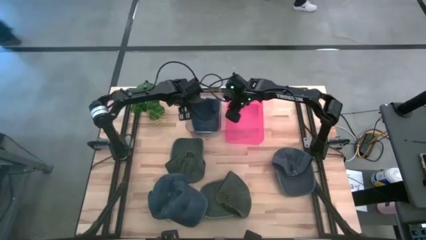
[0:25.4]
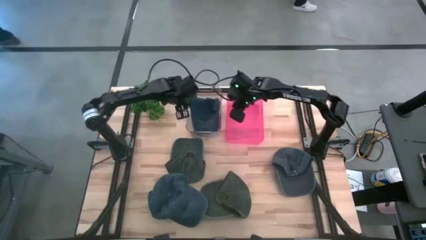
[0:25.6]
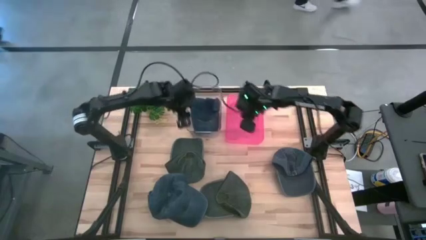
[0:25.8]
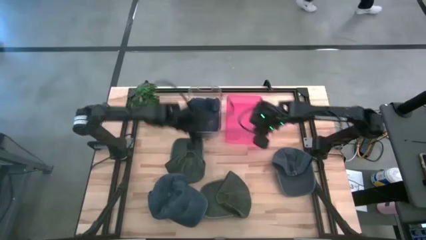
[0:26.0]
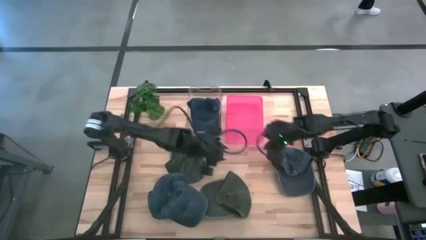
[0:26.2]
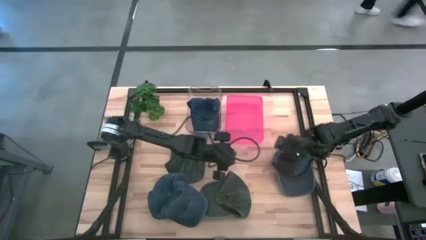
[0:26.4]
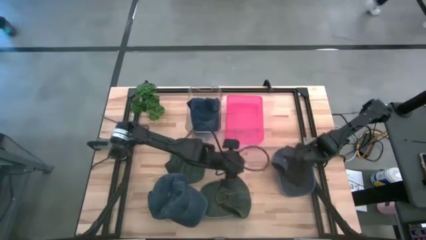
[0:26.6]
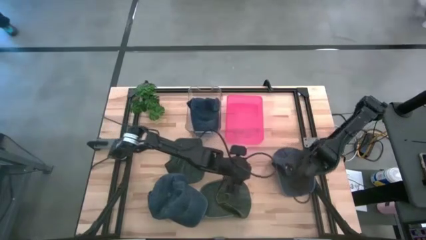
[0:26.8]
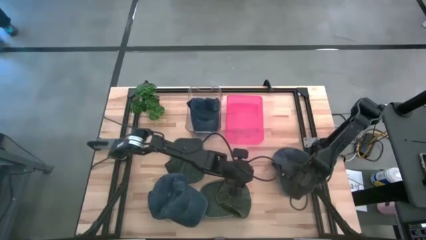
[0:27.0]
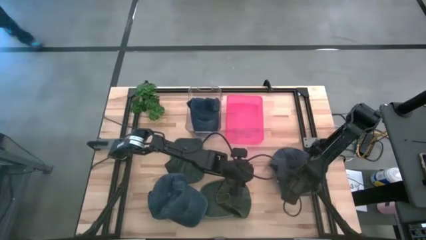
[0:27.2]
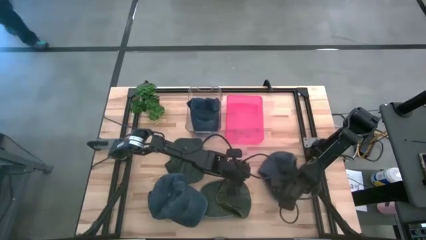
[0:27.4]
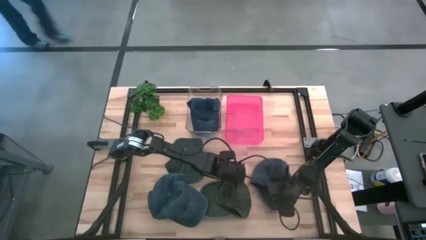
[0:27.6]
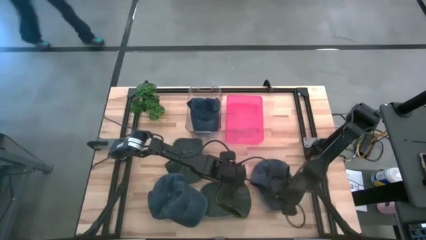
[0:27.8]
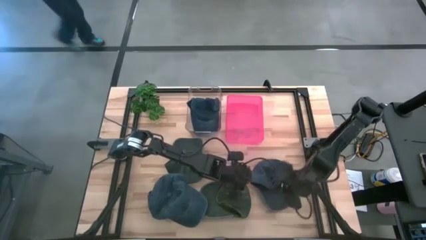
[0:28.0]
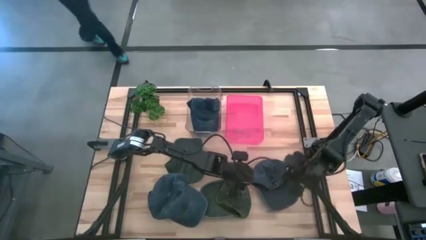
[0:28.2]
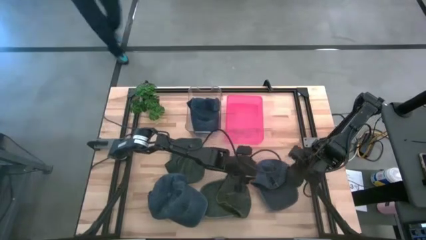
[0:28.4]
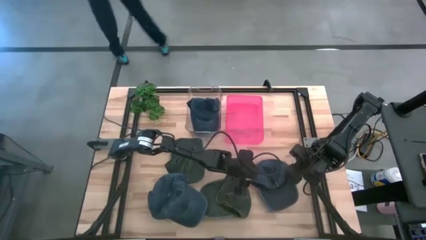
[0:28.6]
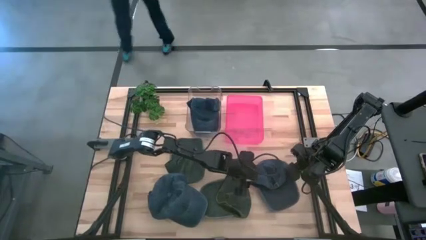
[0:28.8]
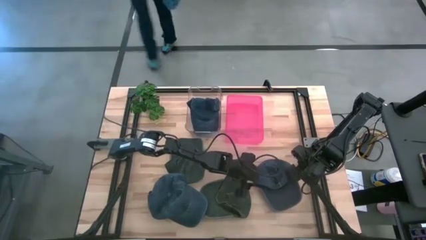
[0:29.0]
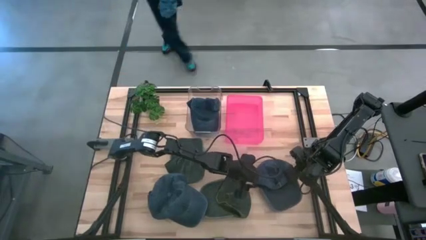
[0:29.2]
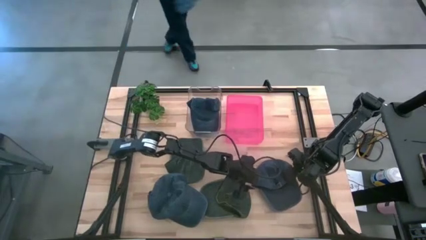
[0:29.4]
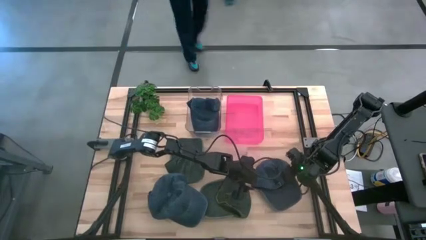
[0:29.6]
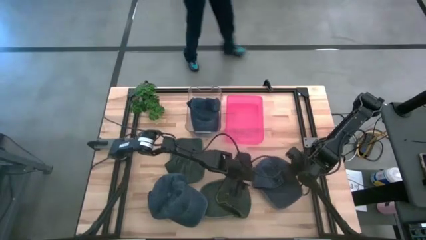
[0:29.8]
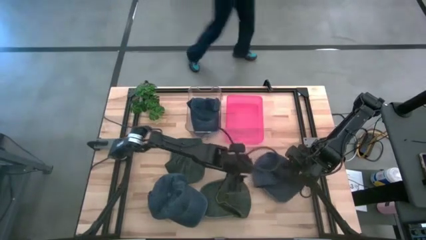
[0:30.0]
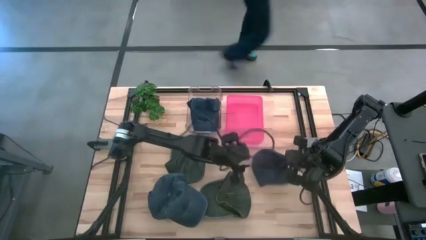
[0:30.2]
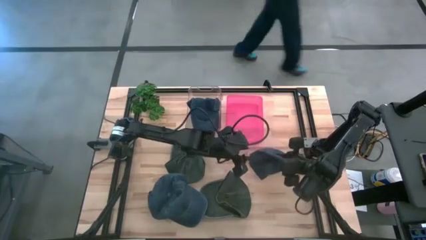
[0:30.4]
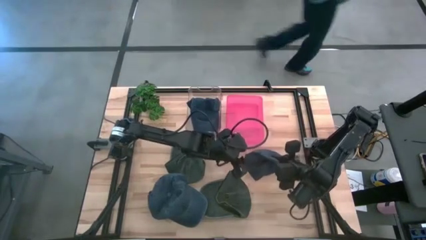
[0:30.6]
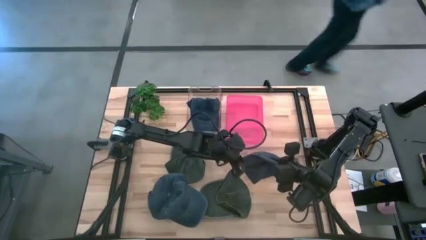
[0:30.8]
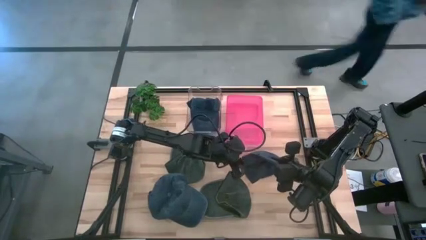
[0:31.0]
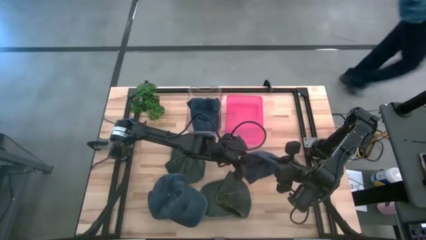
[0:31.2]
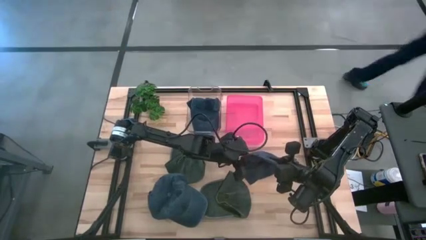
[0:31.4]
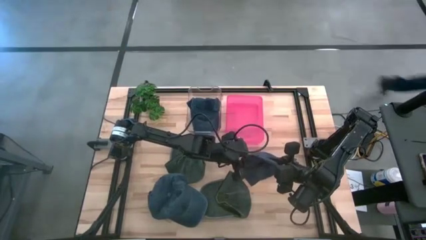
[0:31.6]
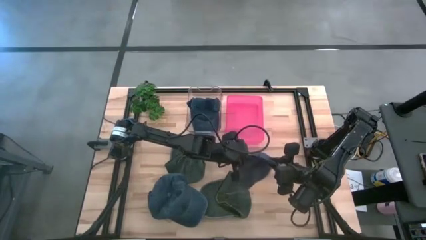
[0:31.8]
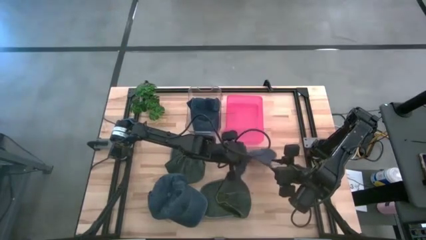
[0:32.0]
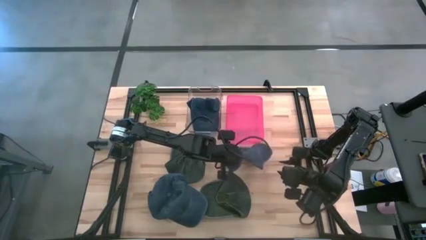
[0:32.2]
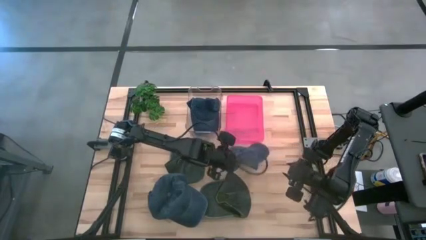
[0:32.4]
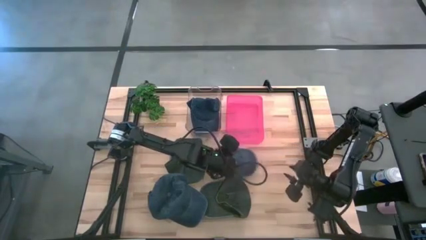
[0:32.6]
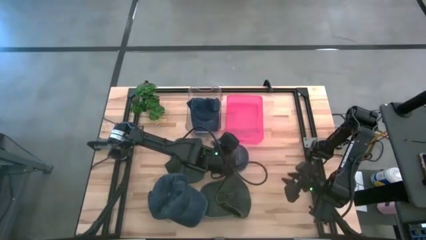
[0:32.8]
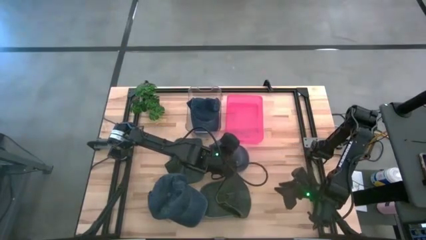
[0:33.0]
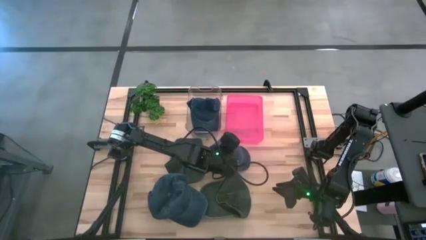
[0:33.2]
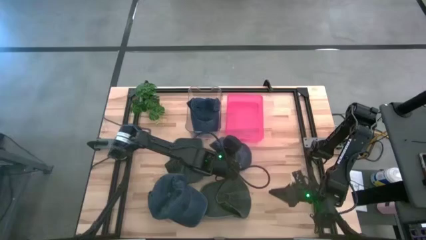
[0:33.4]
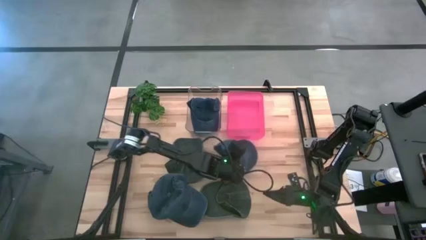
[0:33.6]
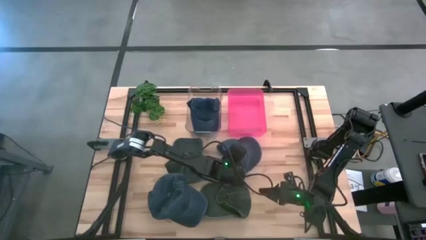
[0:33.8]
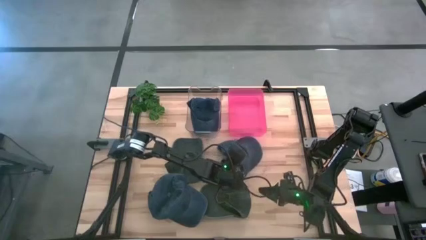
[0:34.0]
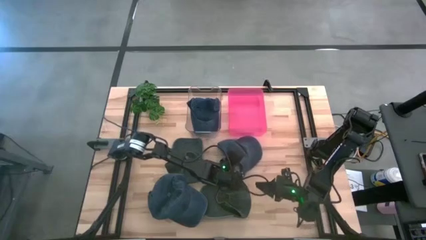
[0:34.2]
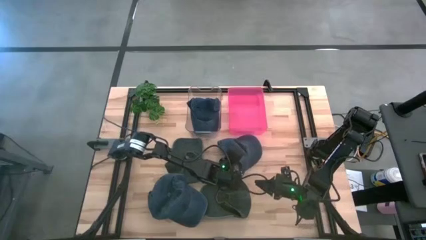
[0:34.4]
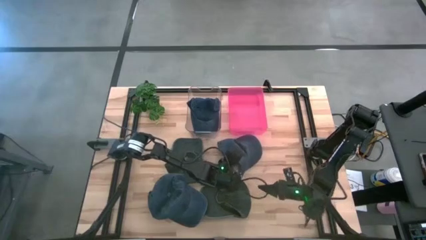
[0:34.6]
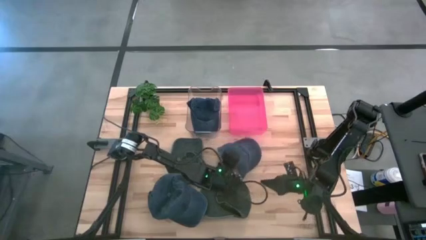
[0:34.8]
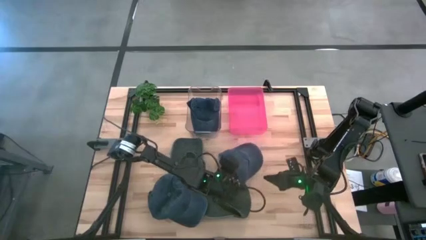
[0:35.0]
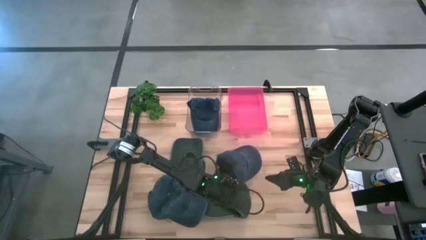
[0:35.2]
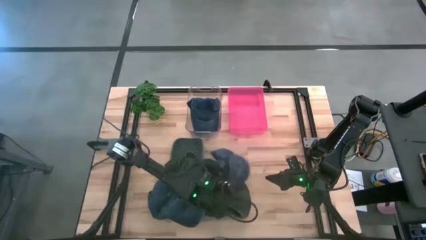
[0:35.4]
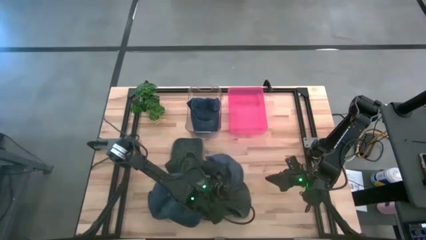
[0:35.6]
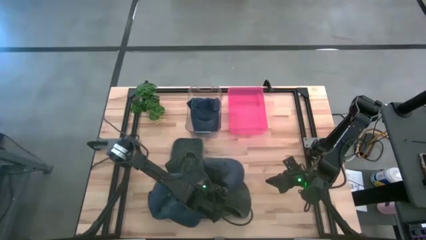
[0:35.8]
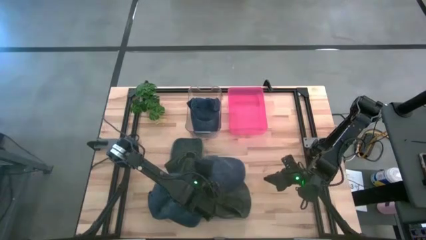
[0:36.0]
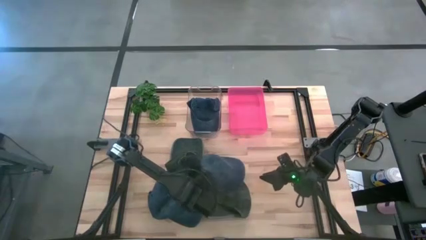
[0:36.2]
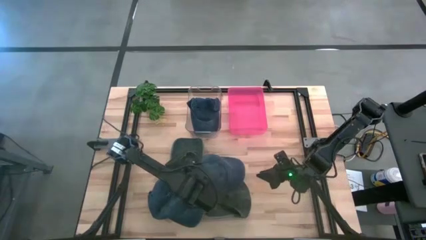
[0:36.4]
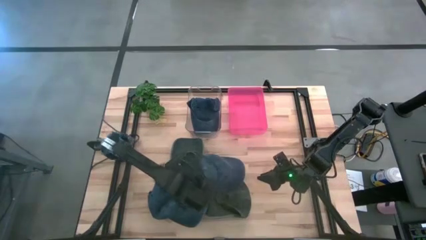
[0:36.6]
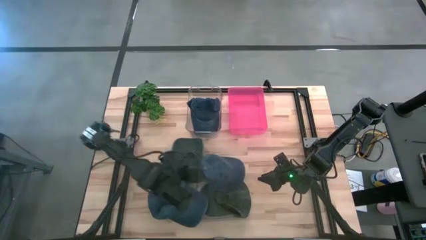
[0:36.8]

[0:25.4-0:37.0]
Task: Pick & Place hat
Put the right blue cap into the transparent bin
